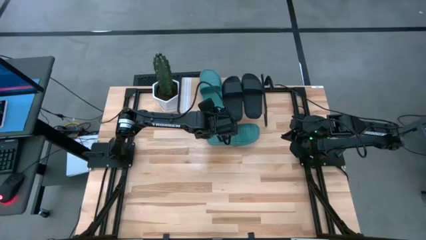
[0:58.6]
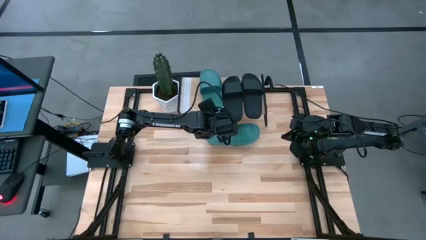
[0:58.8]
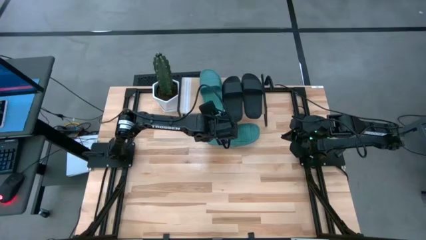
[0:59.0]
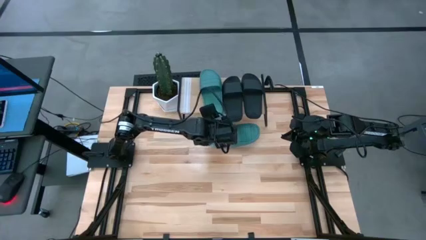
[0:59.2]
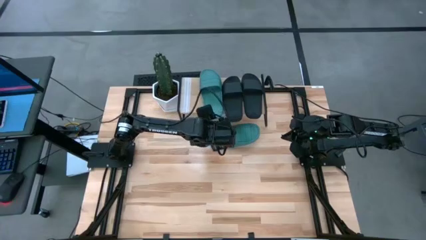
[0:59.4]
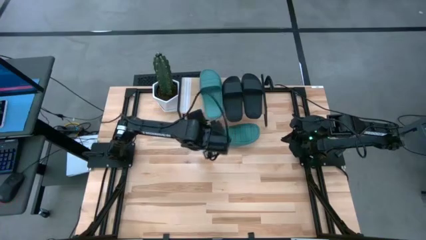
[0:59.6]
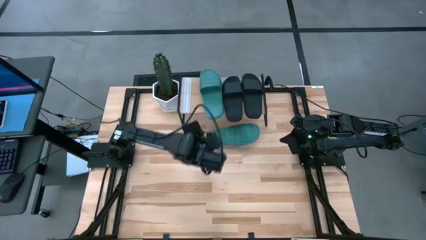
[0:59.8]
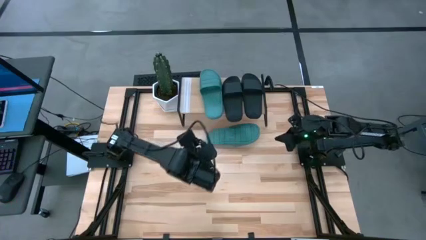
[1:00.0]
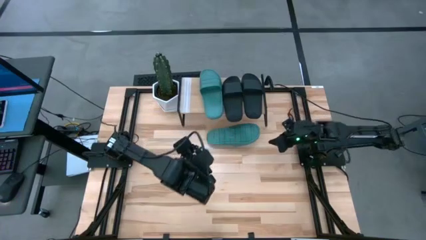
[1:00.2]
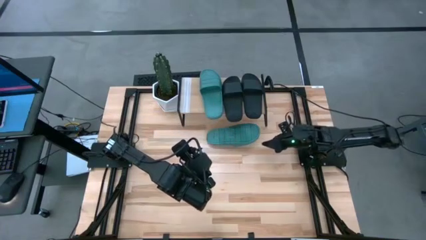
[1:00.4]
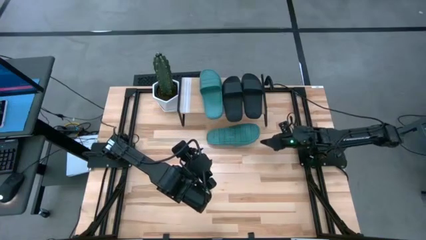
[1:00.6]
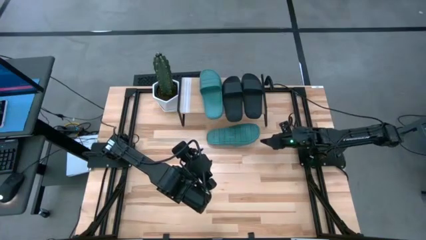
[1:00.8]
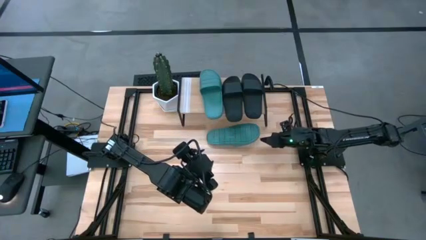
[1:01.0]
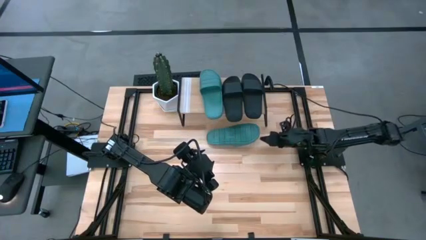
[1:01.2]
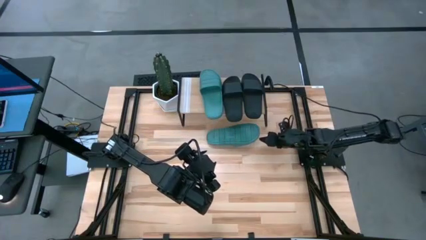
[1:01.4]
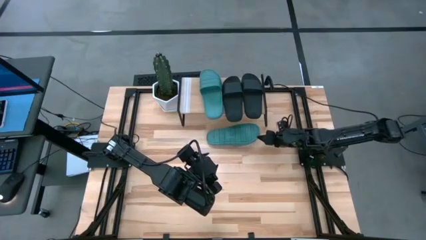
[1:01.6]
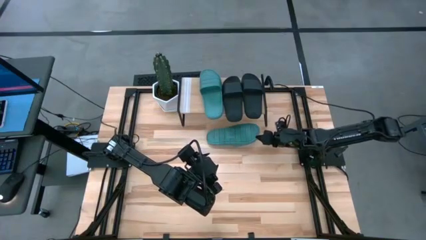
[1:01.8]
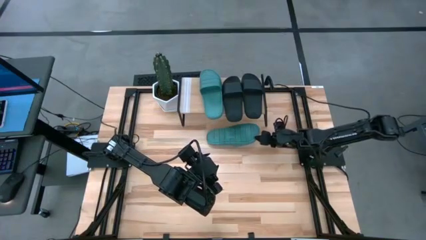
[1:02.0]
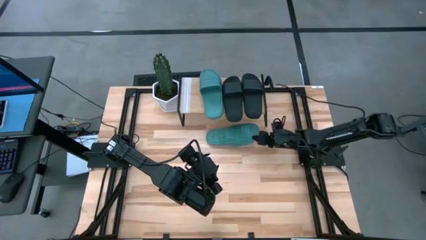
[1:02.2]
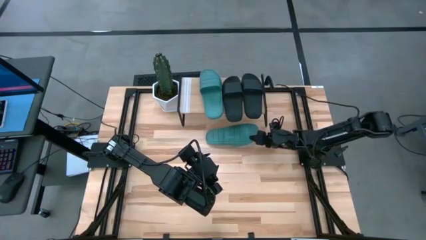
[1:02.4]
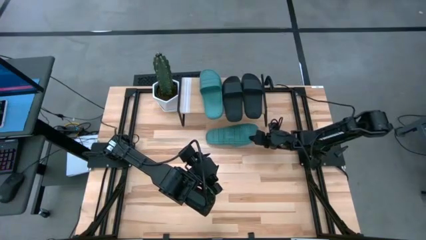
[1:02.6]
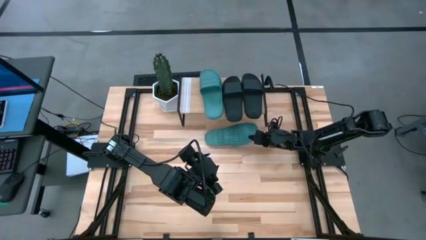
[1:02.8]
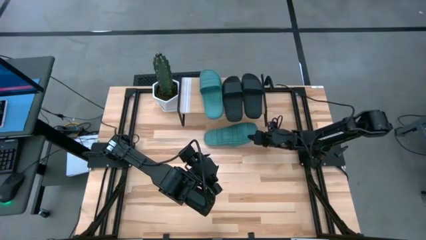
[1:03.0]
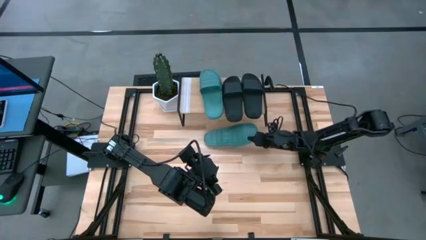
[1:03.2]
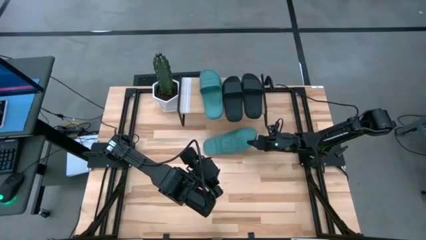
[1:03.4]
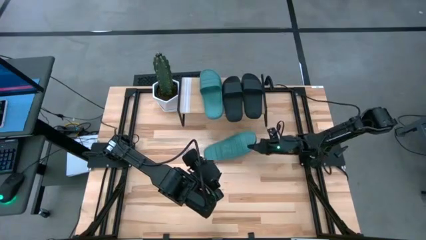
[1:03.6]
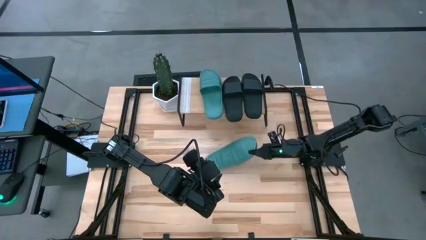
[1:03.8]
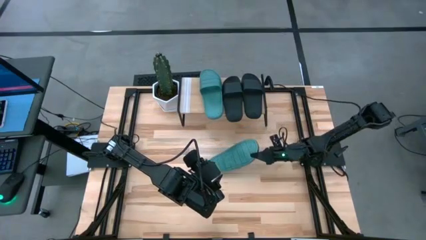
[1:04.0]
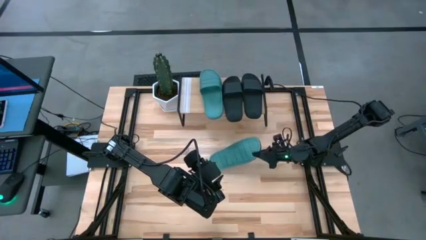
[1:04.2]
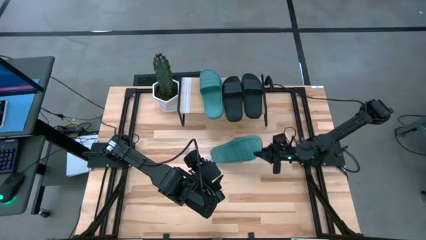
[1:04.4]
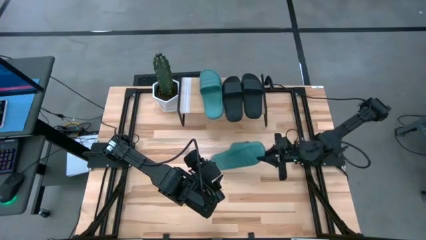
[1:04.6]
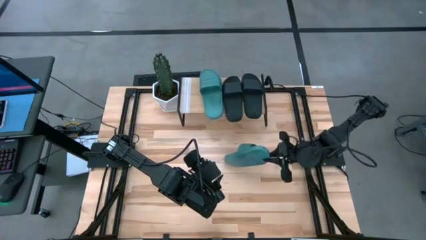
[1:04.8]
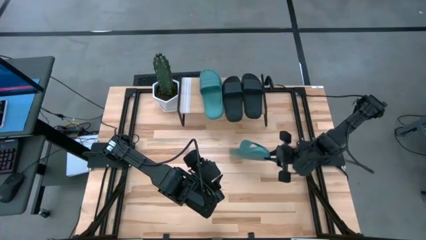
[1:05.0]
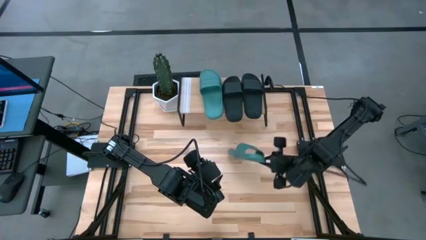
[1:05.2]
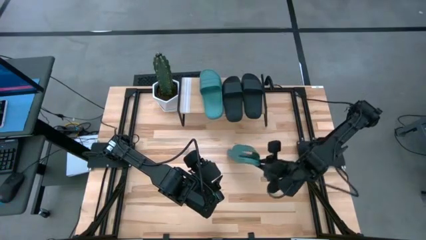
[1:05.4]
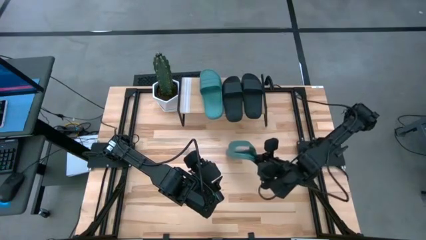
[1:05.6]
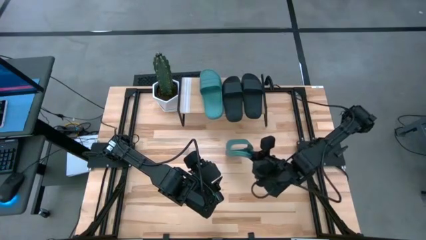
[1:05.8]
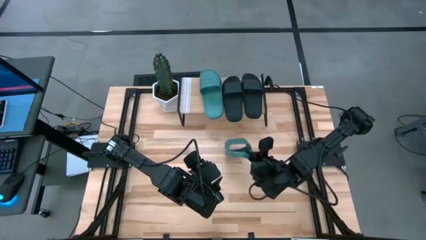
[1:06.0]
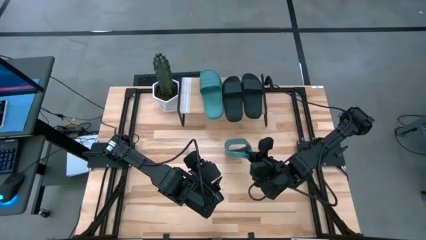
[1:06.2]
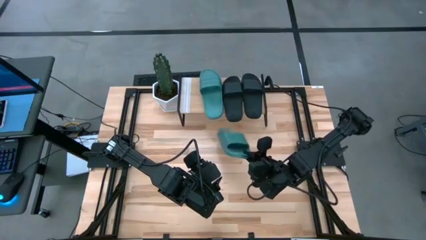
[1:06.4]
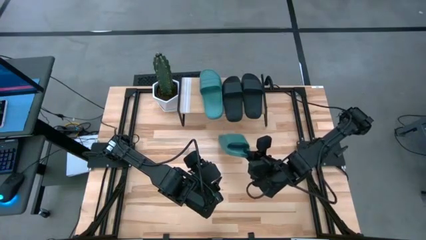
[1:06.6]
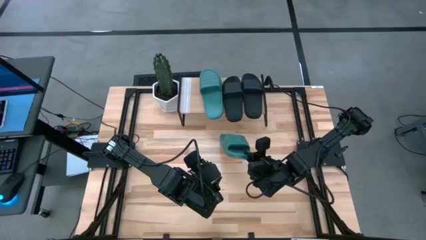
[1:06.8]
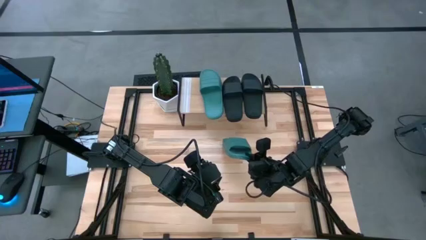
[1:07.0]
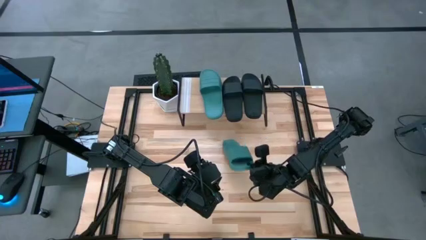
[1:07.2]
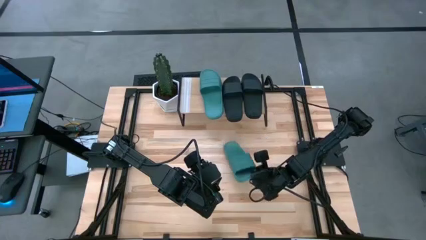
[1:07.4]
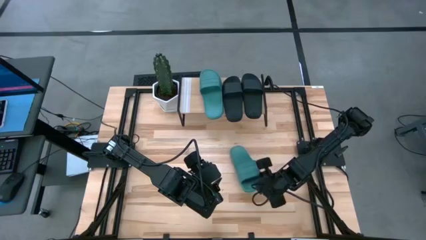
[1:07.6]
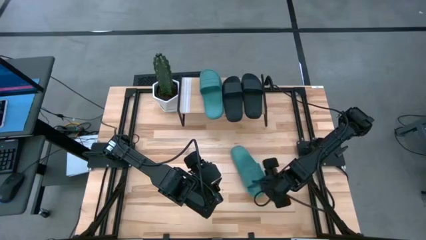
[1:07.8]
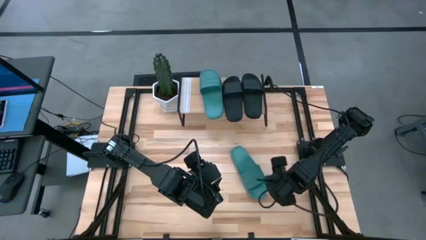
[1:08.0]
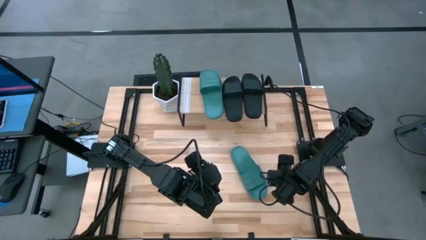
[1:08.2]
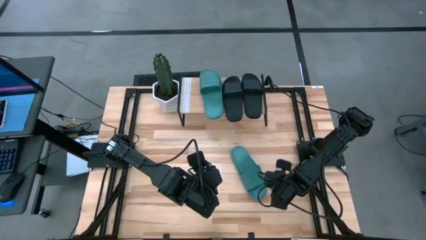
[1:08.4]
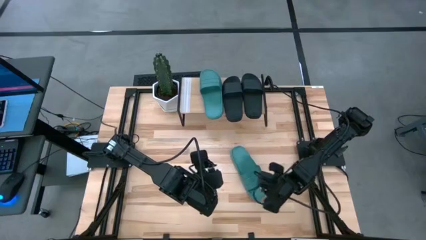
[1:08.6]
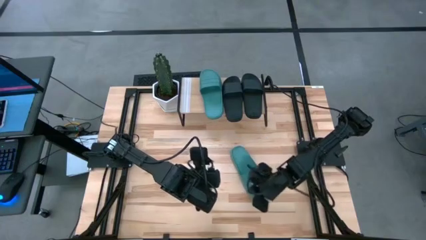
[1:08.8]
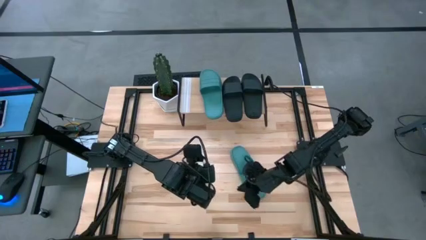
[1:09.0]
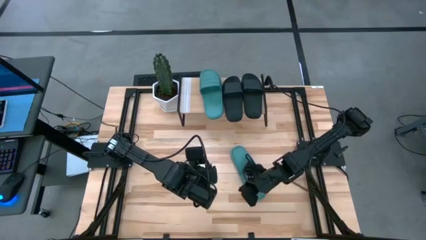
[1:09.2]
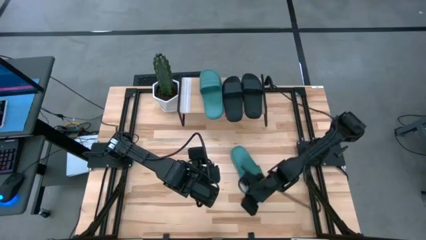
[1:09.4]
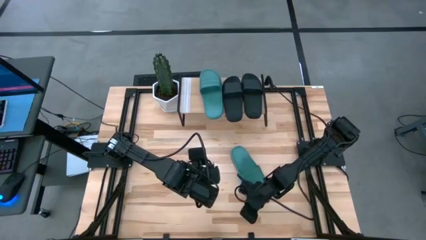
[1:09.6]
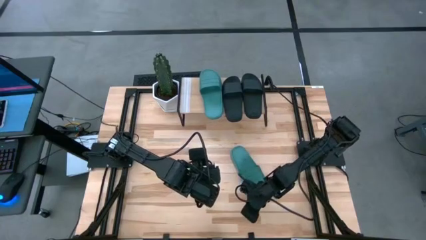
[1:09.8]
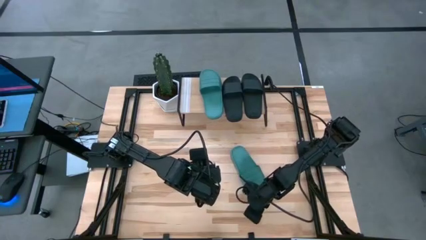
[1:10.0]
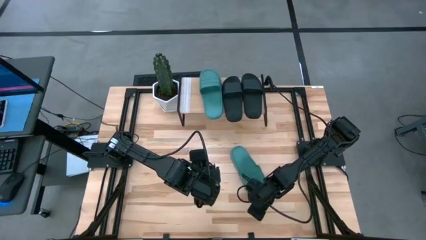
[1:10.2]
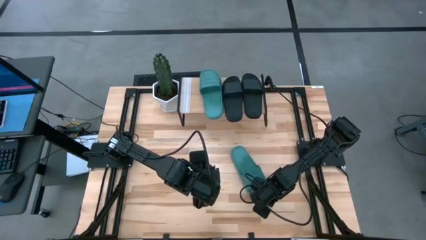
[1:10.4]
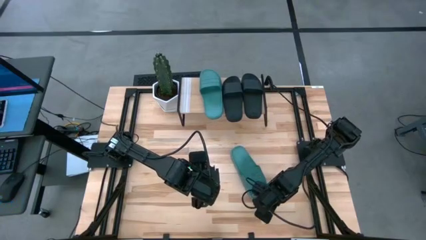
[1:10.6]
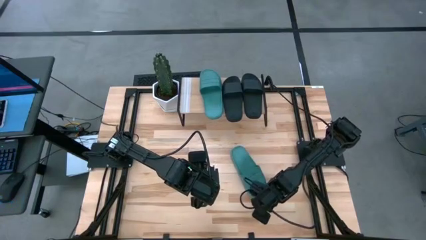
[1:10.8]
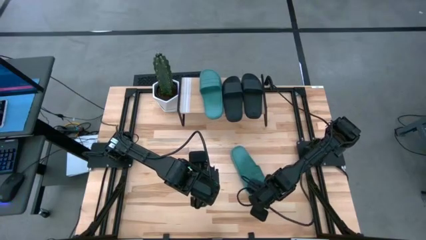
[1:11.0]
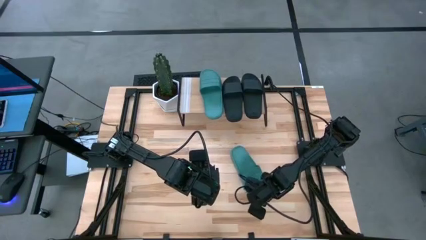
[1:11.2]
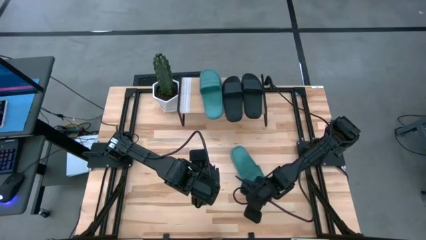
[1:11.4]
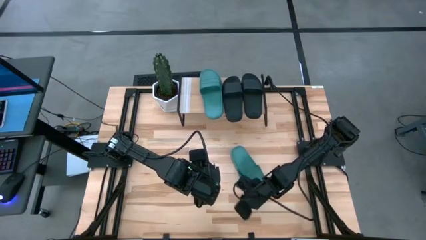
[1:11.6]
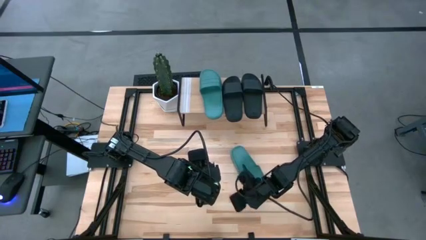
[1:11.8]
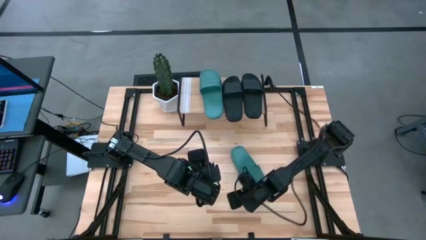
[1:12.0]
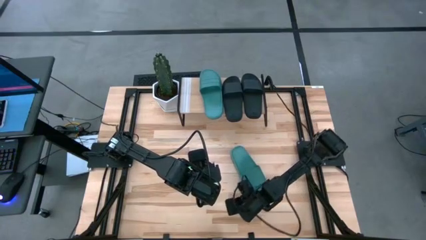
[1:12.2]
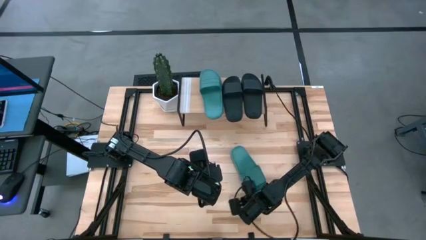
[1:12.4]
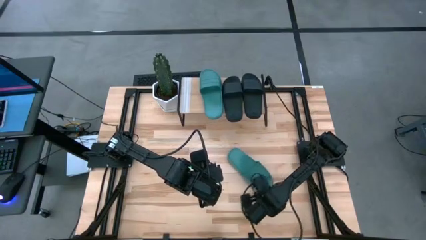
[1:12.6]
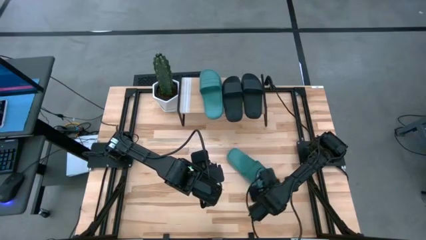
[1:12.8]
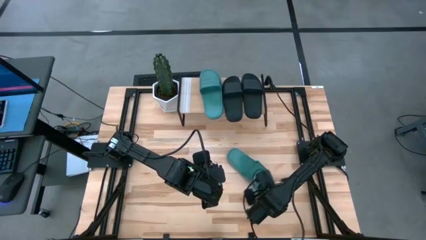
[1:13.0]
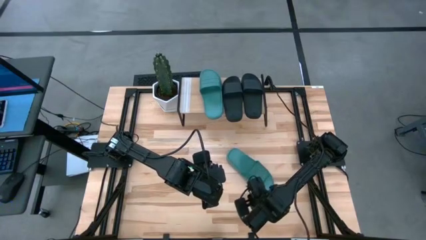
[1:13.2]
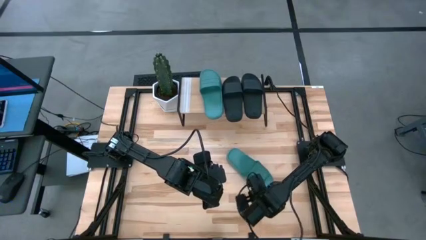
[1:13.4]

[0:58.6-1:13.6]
Task: Pick and place slides into the shelf
Put the green slipper on the shelf beside the green slipper
